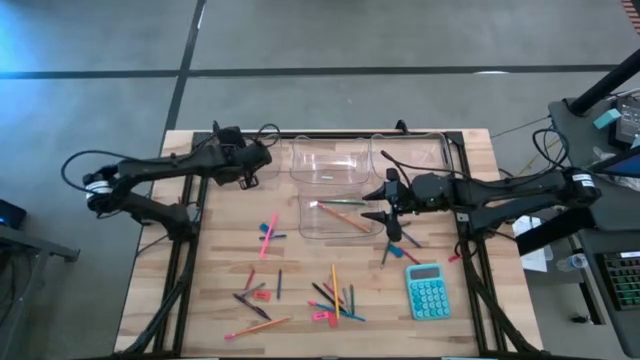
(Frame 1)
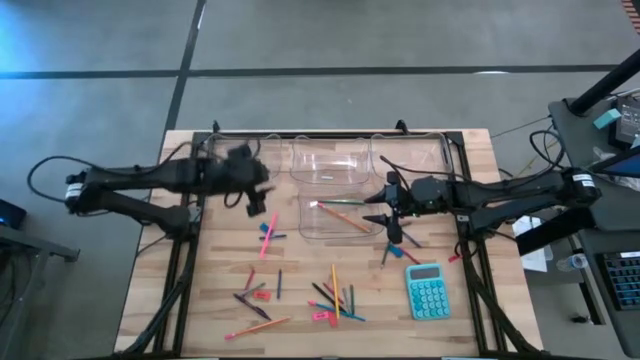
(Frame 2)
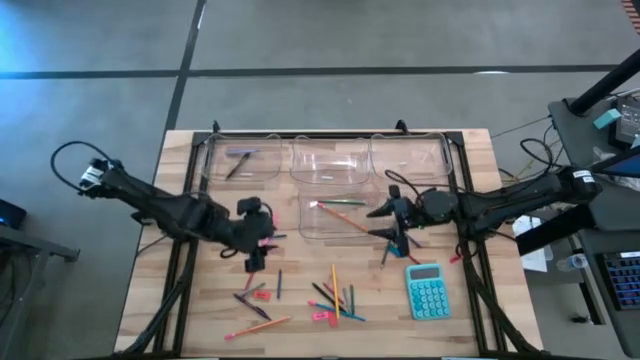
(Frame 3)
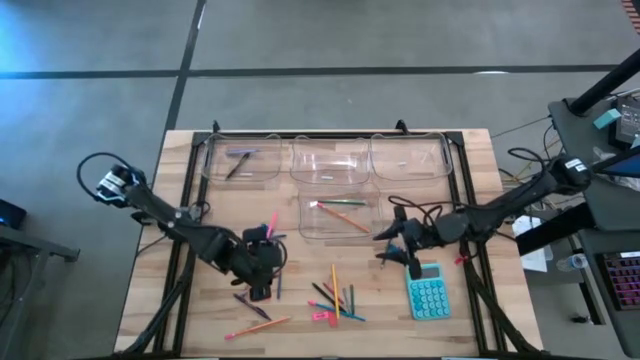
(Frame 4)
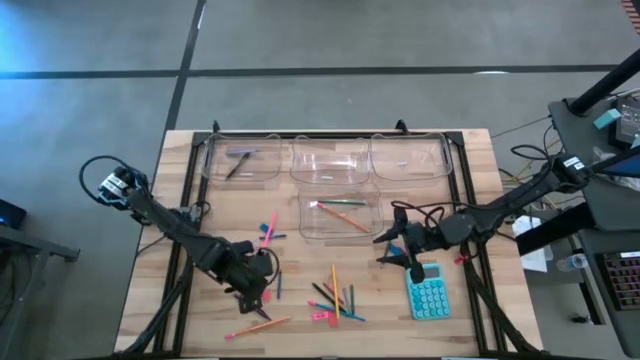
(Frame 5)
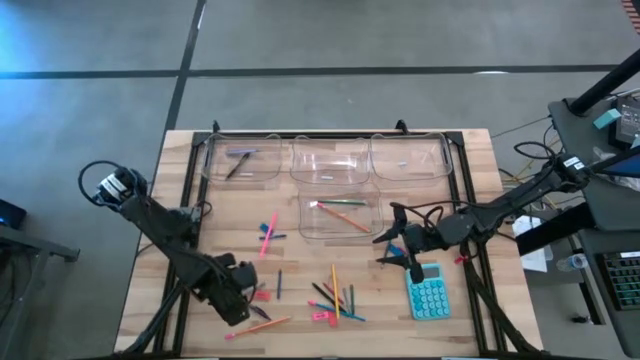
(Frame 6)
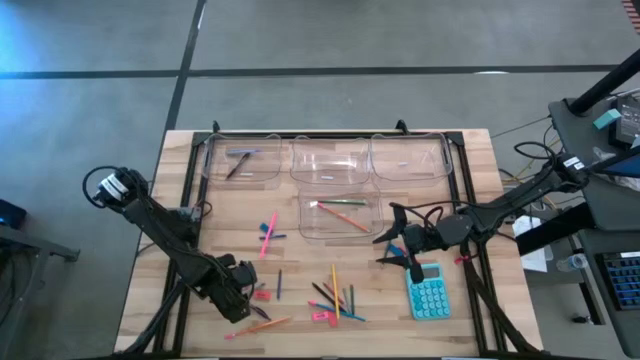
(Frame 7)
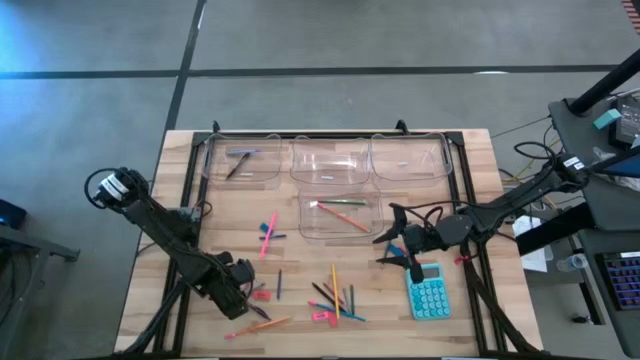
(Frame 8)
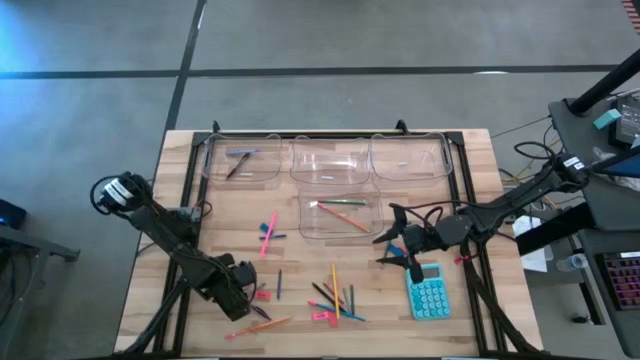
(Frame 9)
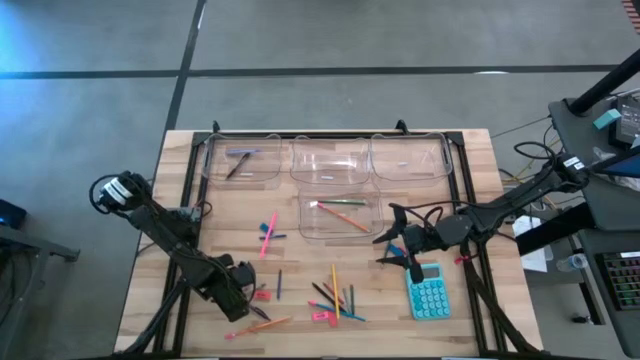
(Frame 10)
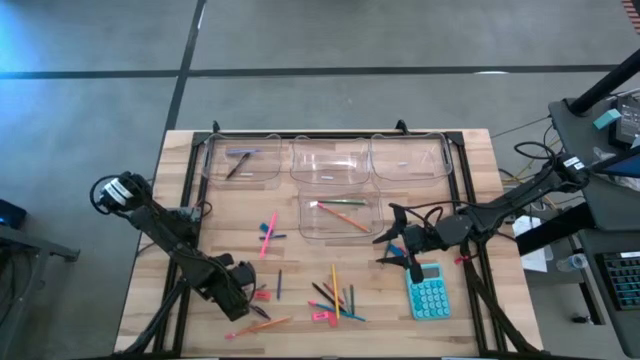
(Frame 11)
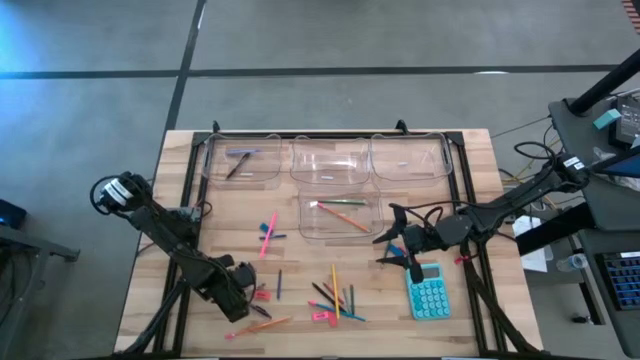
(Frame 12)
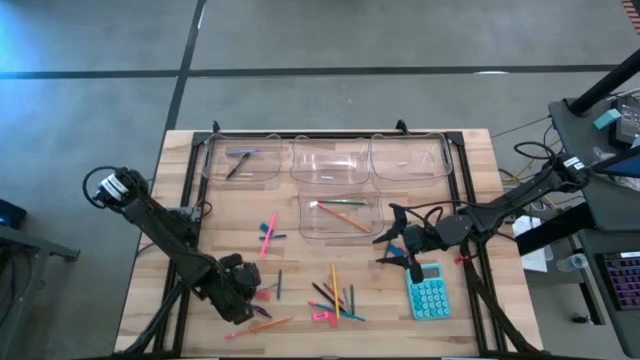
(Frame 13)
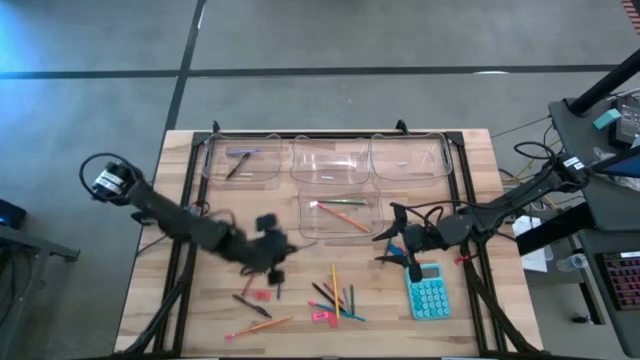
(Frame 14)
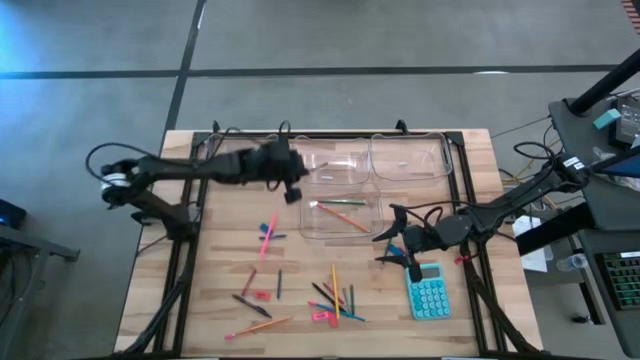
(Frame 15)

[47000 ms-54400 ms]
Task: Sort crayons/erasers/pens/pencils in bins
Put the left gray crayon into the top middle transparent bin

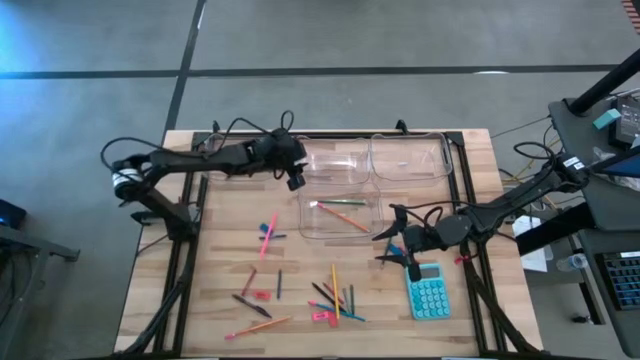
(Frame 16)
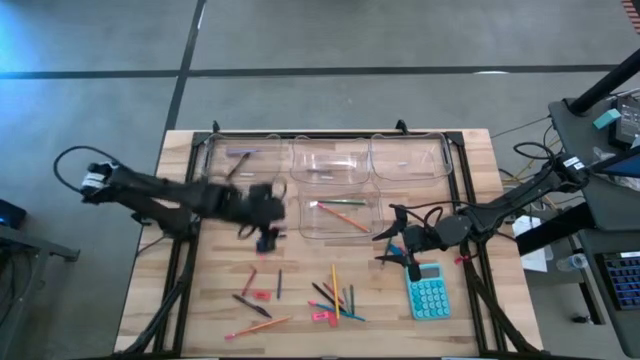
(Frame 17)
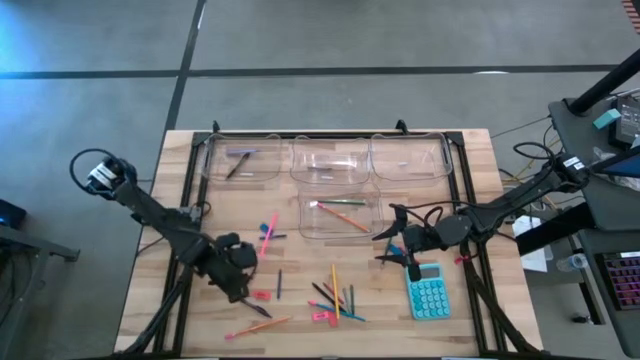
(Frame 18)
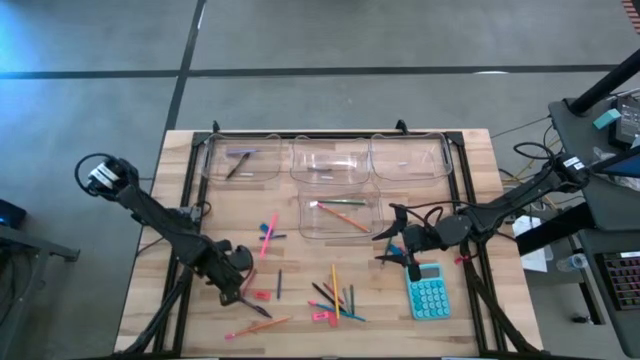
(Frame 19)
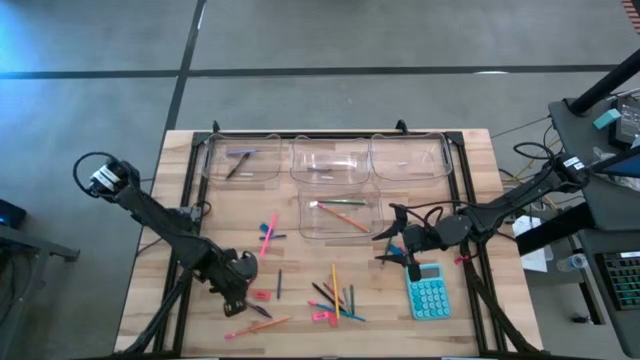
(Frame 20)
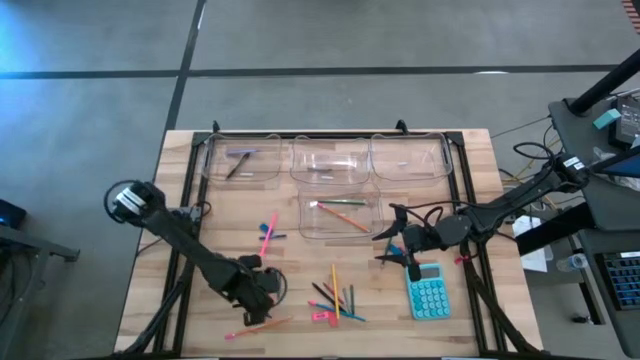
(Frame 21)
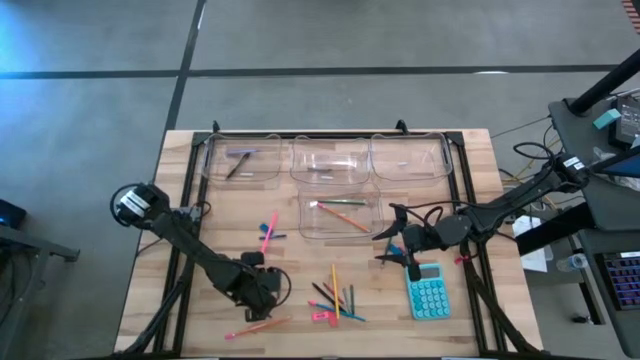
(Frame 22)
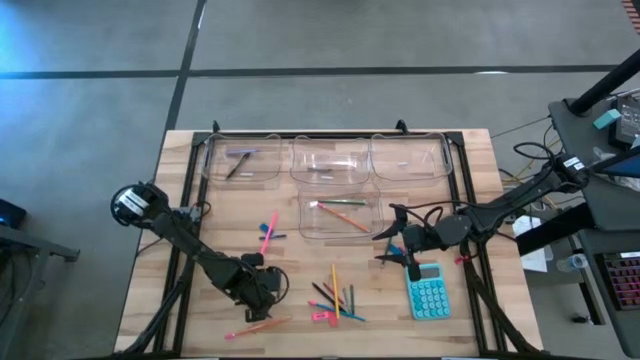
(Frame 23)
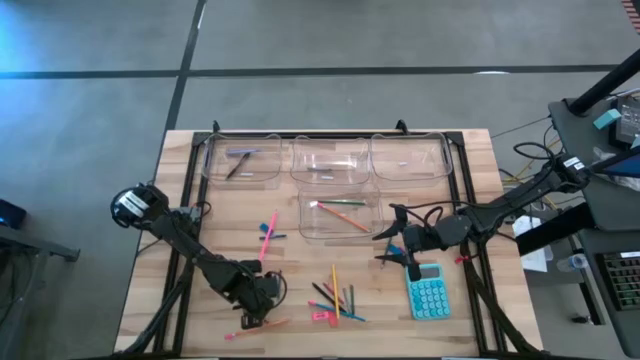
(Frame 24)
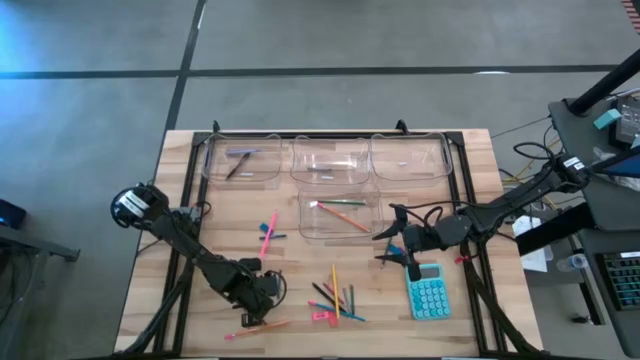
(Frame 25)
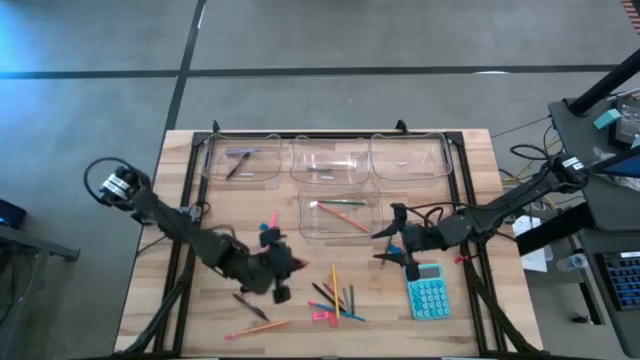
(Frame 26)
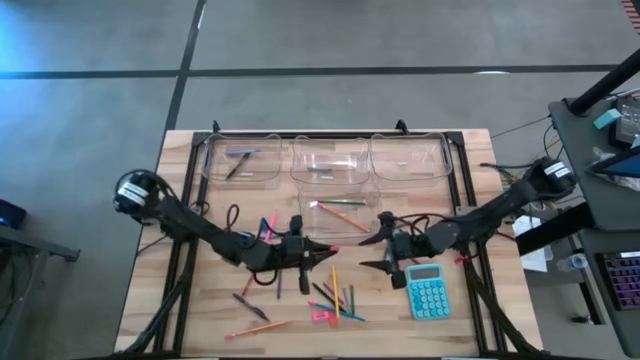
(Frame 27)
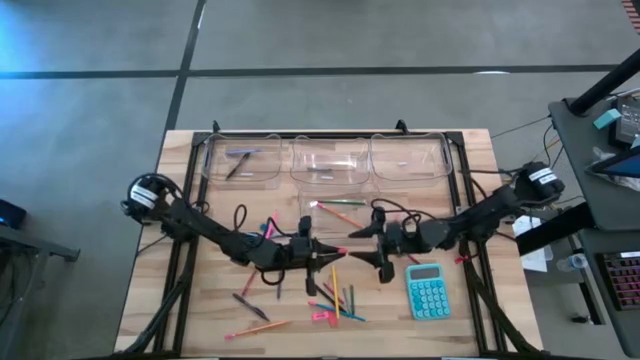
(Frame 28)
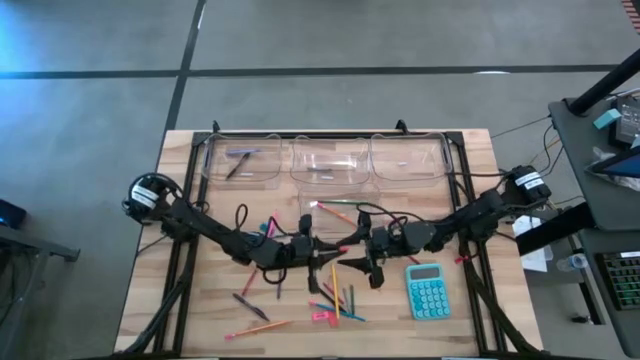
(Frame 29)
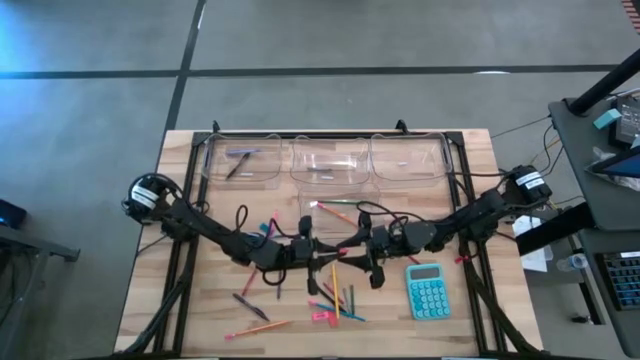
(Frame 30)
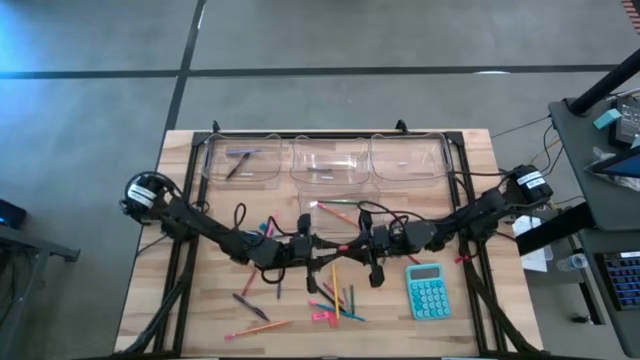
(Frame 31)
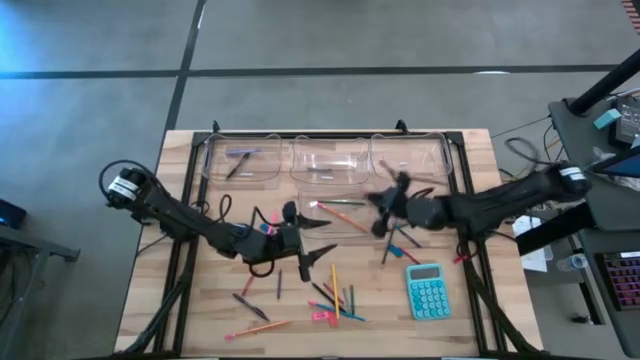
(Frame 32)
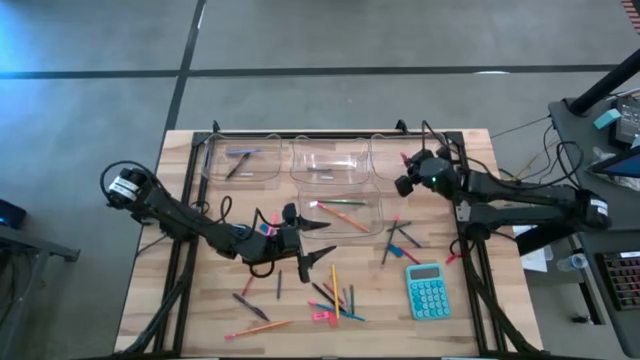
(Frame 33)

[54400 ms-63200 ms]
Put the left orange eraser into the top right transparent bin

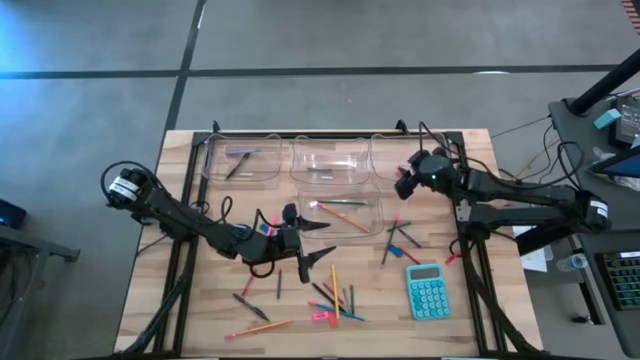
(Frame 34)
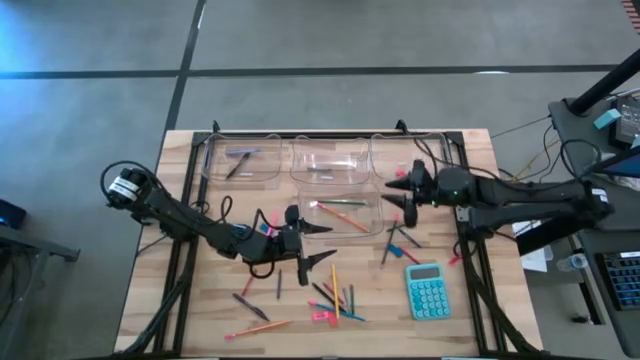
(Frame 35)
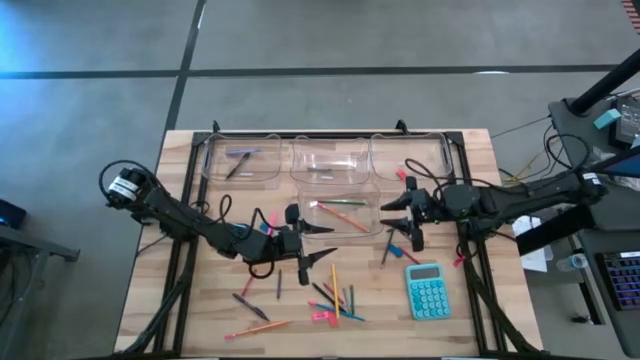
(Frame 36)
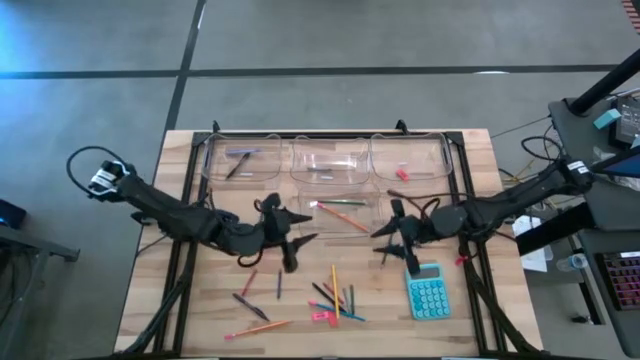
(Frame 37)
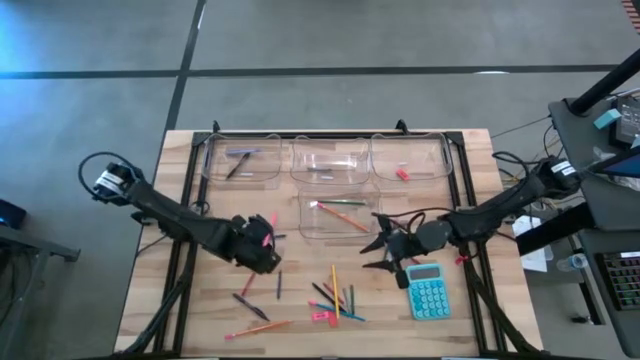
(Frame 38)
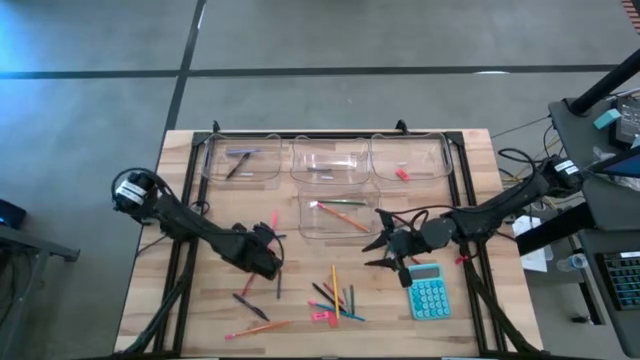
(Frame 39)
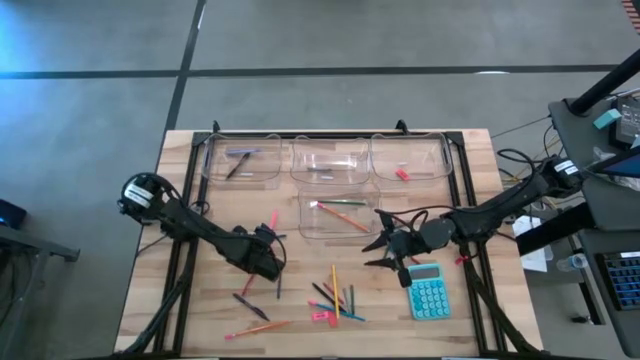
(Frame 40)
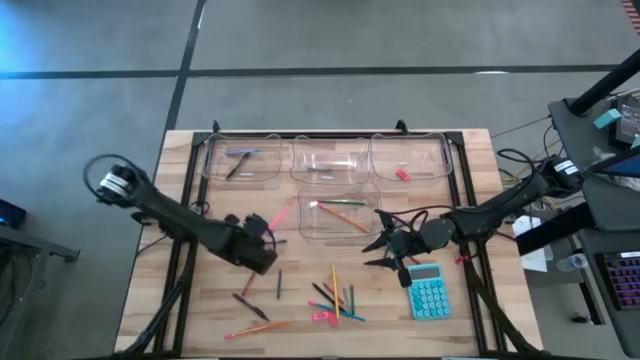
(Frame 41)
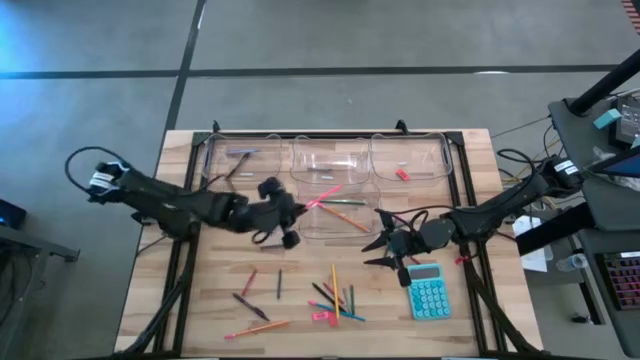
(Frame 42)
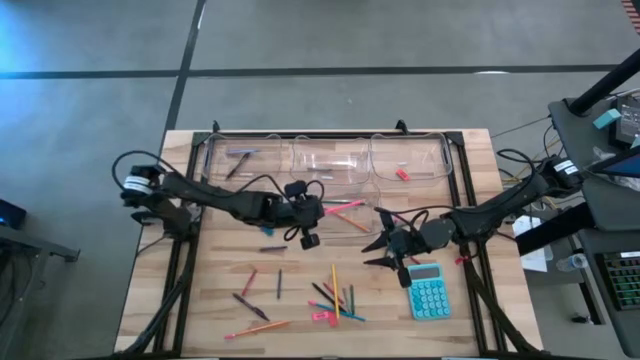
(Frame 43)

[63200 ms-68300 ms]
Put the pink pencil into the bottom transparent bin
